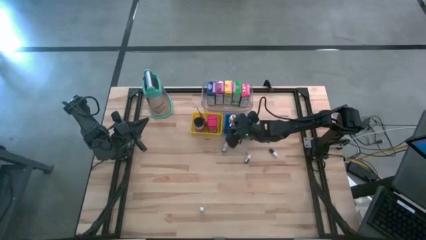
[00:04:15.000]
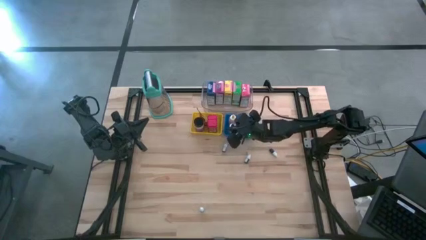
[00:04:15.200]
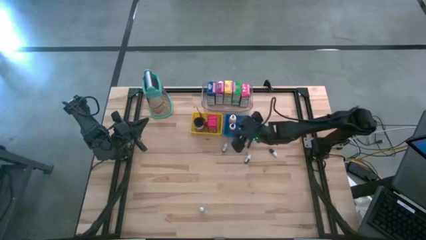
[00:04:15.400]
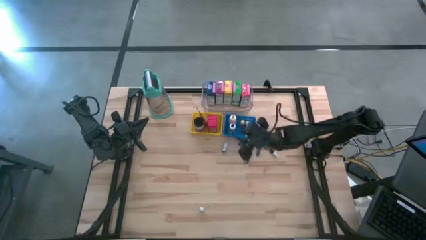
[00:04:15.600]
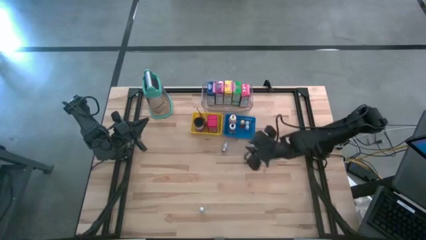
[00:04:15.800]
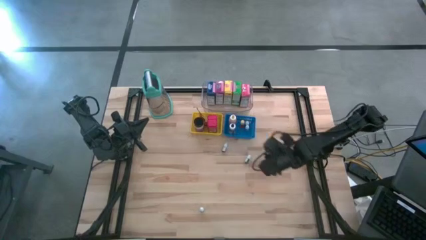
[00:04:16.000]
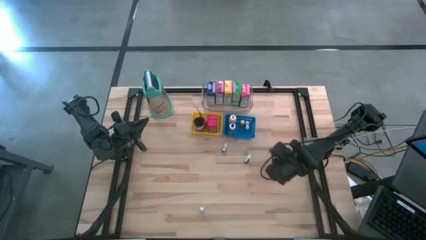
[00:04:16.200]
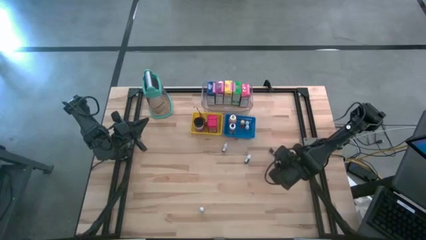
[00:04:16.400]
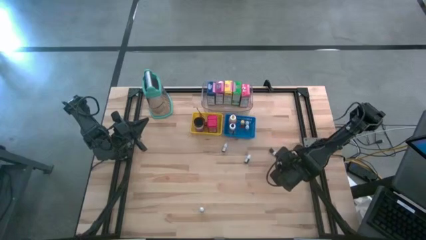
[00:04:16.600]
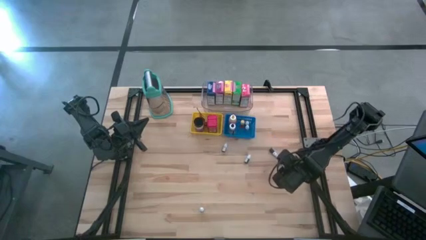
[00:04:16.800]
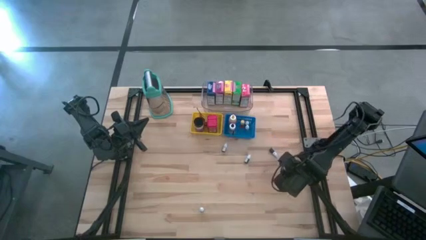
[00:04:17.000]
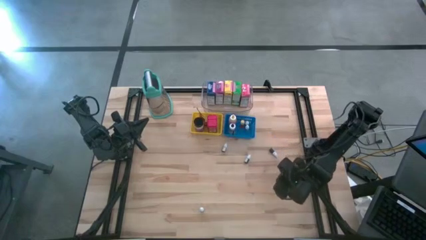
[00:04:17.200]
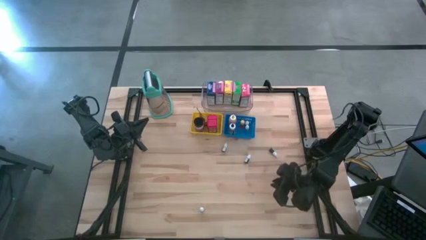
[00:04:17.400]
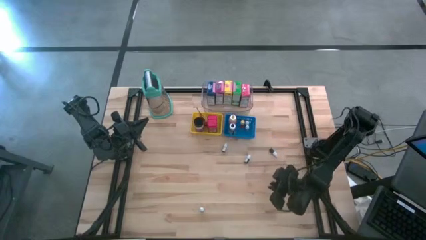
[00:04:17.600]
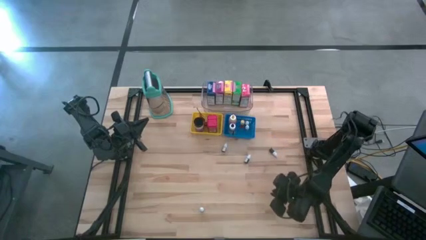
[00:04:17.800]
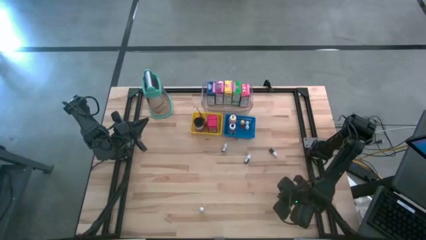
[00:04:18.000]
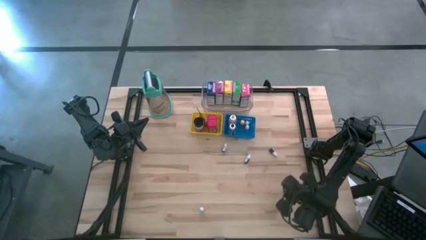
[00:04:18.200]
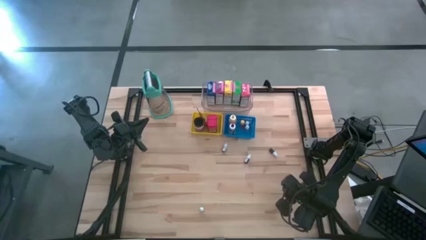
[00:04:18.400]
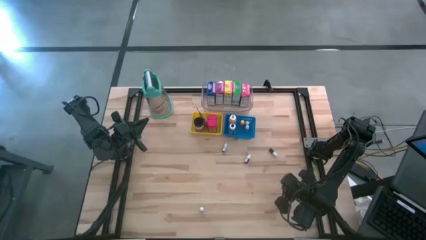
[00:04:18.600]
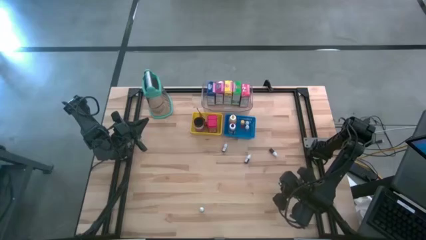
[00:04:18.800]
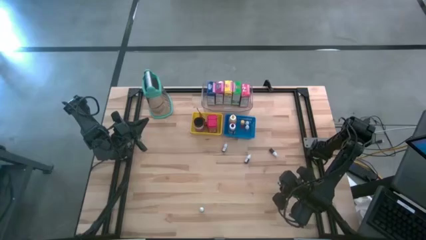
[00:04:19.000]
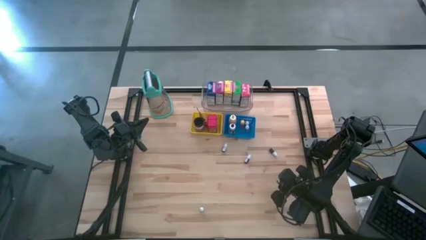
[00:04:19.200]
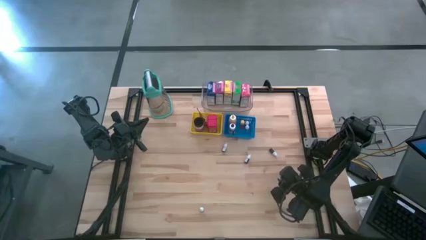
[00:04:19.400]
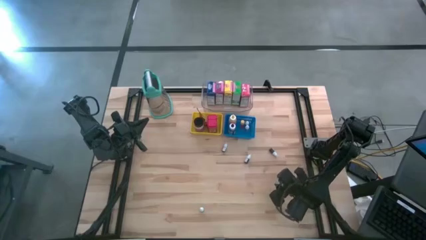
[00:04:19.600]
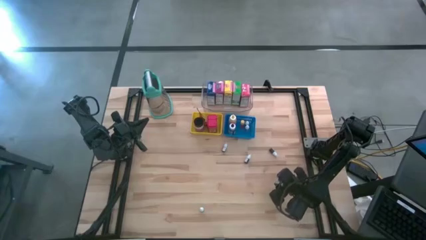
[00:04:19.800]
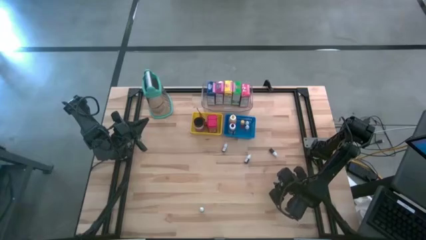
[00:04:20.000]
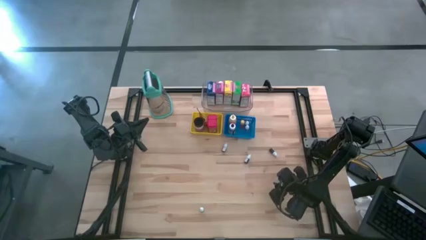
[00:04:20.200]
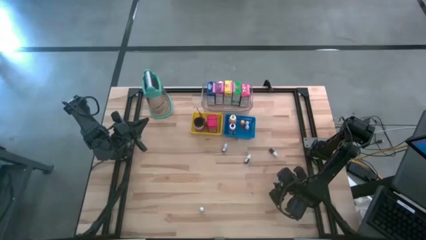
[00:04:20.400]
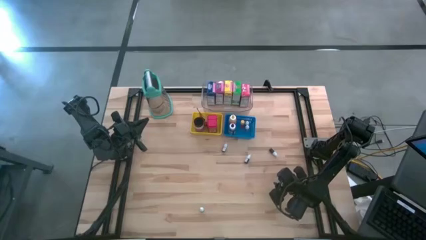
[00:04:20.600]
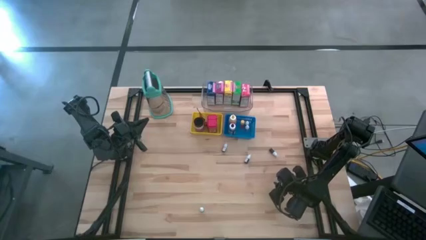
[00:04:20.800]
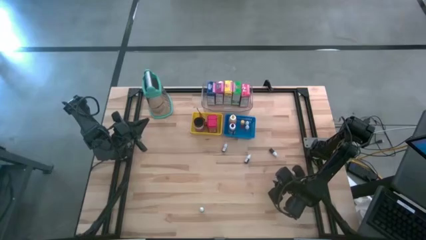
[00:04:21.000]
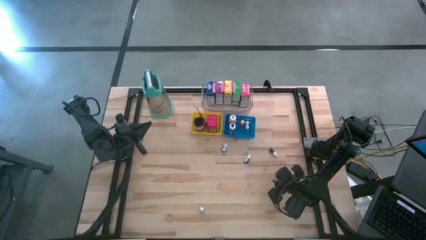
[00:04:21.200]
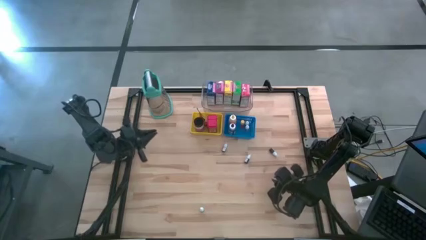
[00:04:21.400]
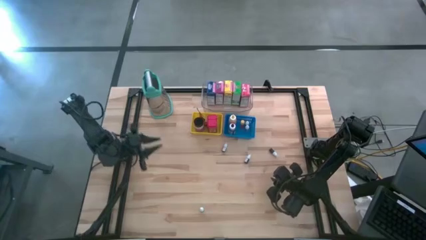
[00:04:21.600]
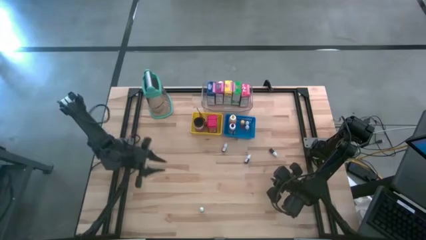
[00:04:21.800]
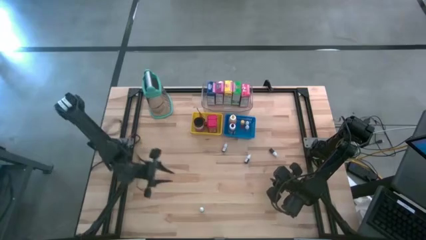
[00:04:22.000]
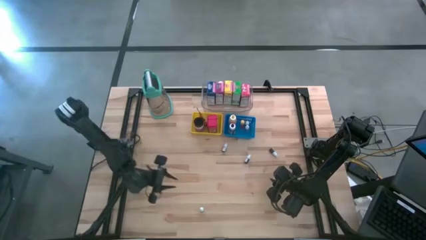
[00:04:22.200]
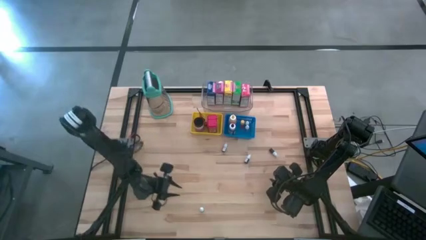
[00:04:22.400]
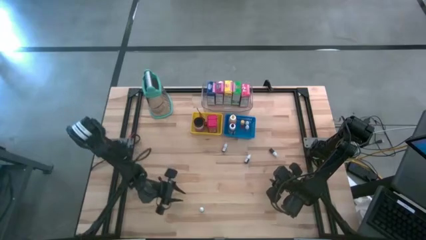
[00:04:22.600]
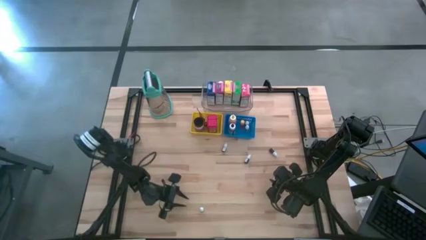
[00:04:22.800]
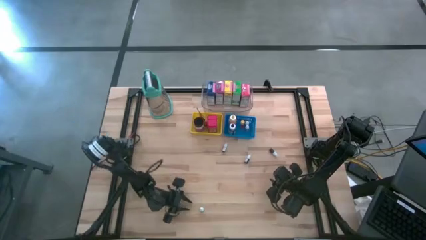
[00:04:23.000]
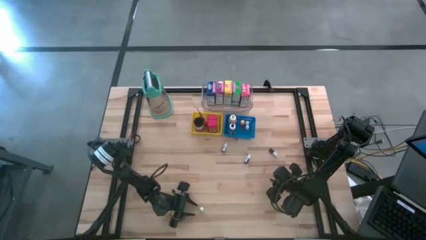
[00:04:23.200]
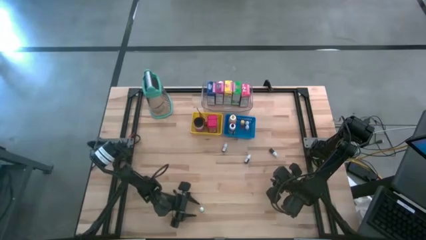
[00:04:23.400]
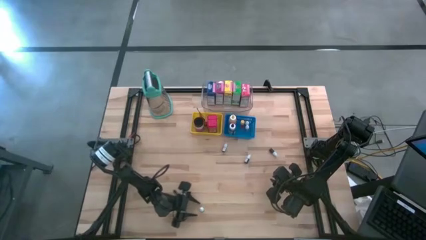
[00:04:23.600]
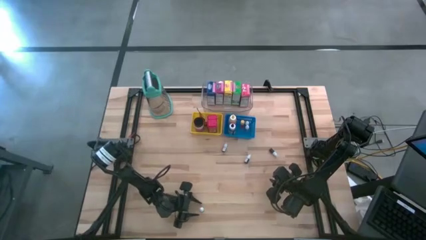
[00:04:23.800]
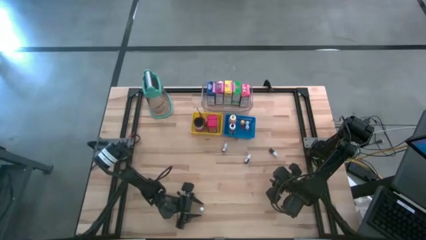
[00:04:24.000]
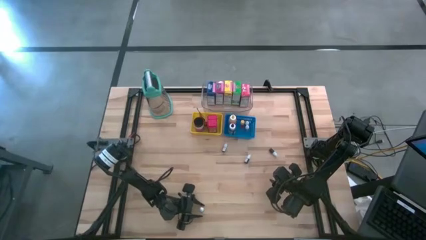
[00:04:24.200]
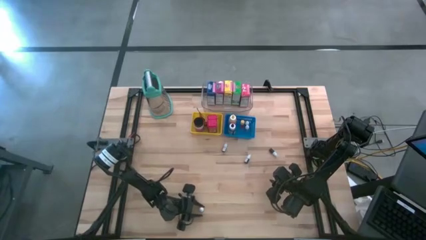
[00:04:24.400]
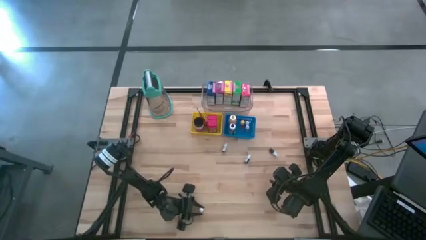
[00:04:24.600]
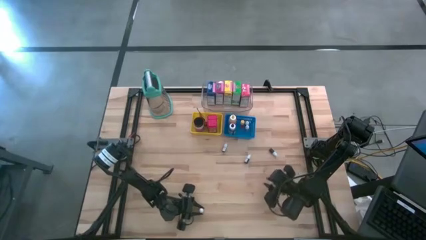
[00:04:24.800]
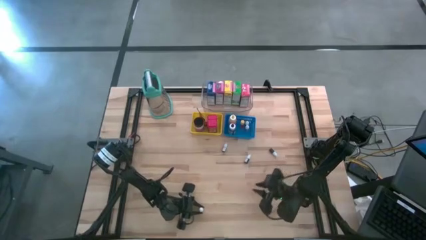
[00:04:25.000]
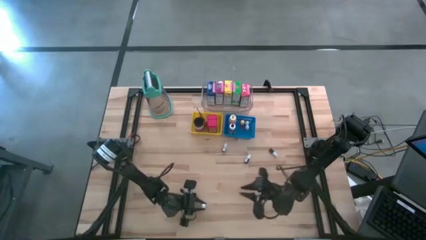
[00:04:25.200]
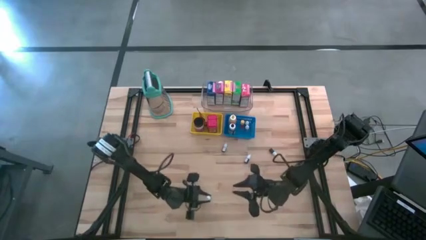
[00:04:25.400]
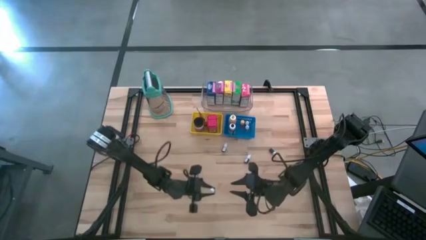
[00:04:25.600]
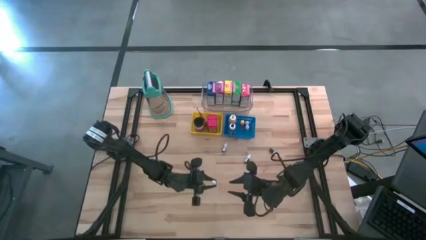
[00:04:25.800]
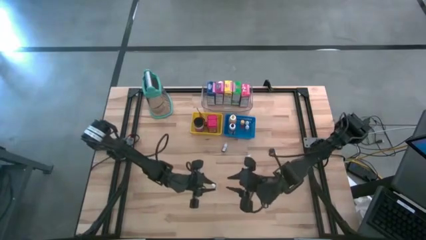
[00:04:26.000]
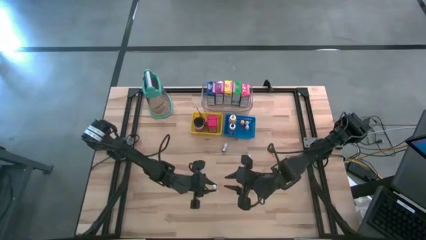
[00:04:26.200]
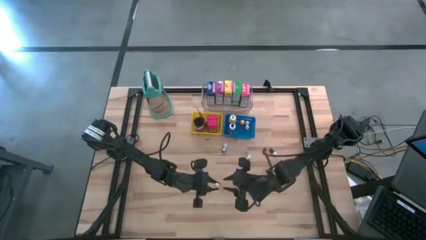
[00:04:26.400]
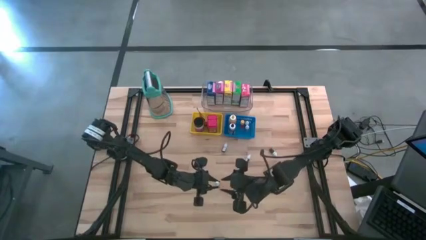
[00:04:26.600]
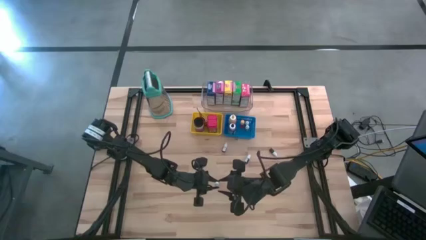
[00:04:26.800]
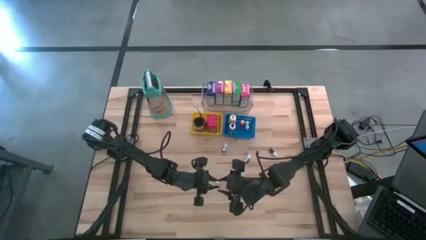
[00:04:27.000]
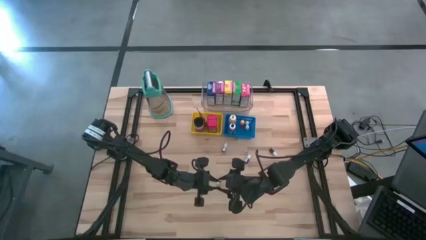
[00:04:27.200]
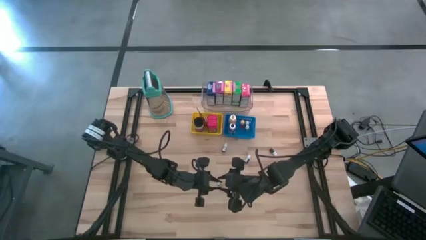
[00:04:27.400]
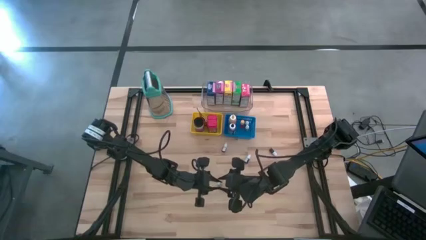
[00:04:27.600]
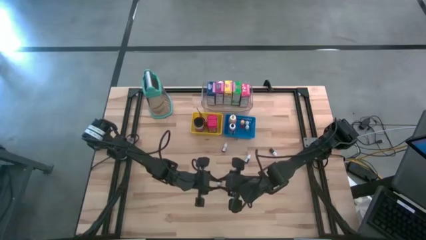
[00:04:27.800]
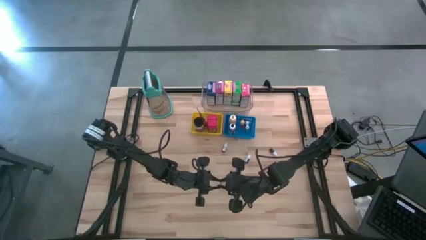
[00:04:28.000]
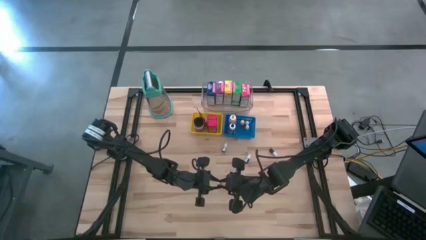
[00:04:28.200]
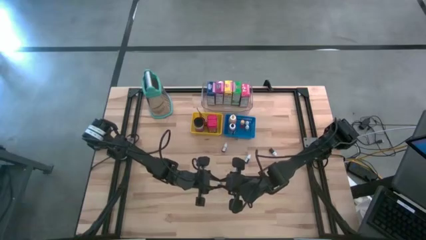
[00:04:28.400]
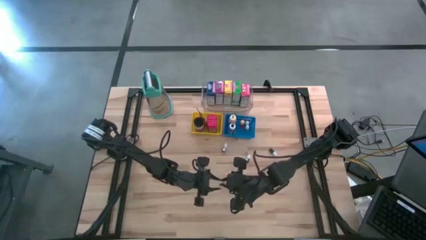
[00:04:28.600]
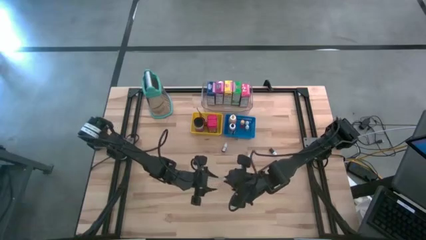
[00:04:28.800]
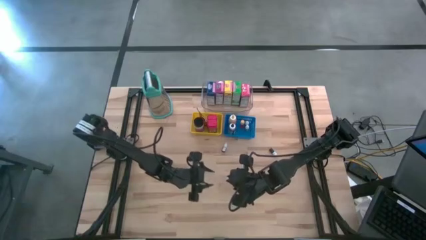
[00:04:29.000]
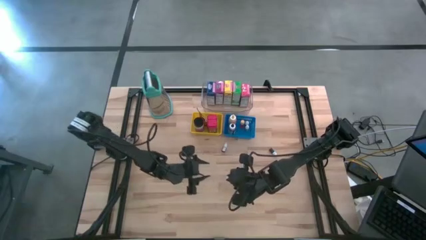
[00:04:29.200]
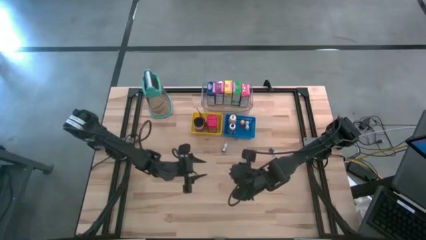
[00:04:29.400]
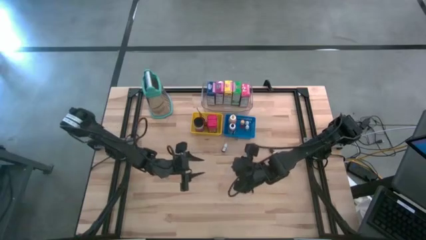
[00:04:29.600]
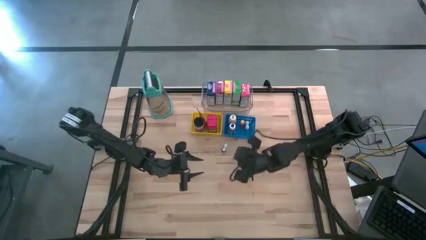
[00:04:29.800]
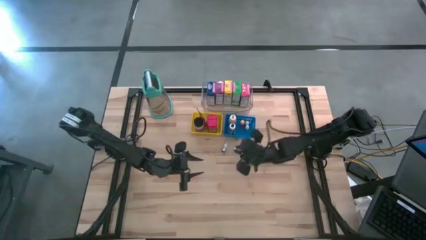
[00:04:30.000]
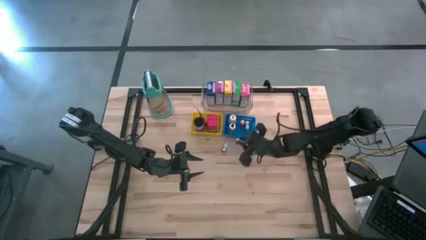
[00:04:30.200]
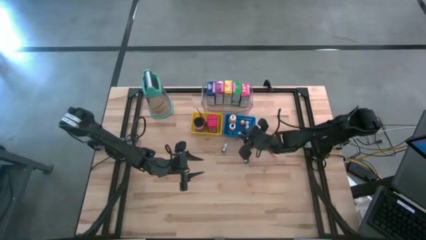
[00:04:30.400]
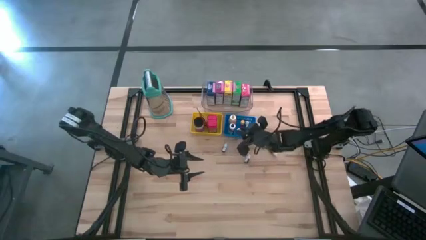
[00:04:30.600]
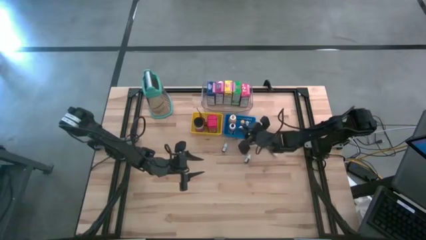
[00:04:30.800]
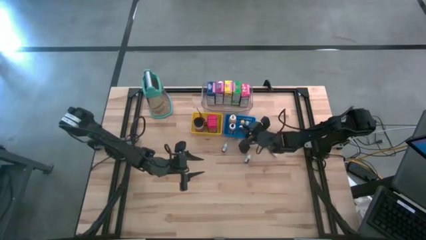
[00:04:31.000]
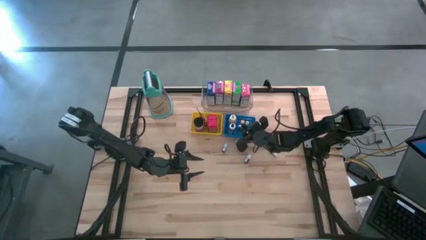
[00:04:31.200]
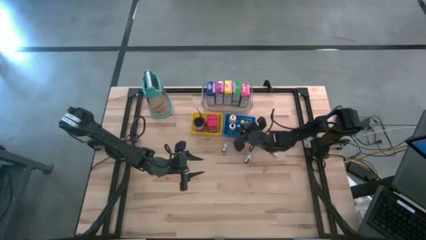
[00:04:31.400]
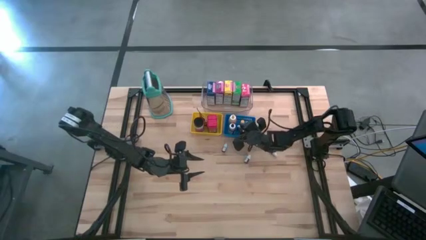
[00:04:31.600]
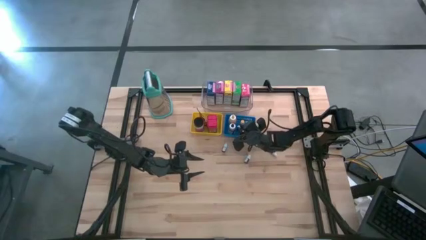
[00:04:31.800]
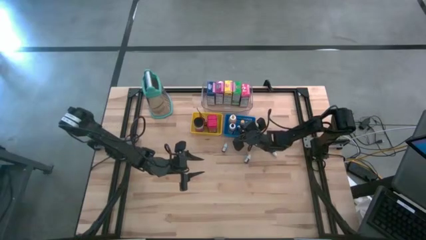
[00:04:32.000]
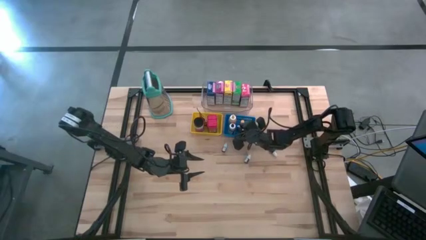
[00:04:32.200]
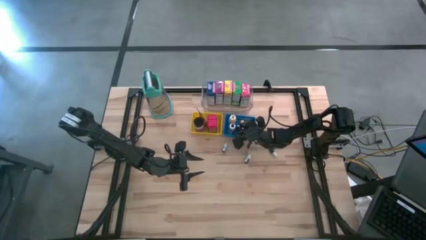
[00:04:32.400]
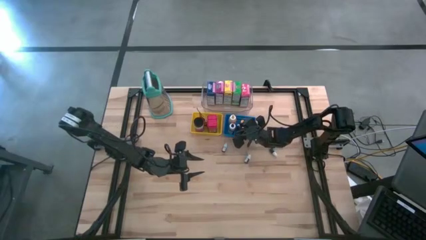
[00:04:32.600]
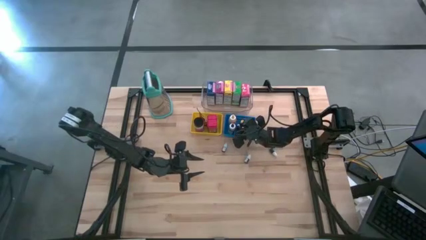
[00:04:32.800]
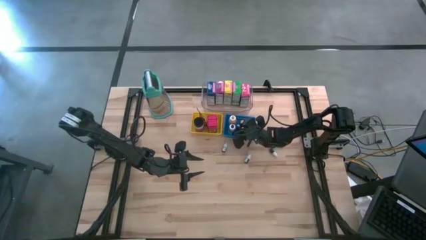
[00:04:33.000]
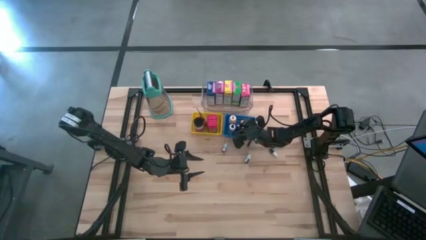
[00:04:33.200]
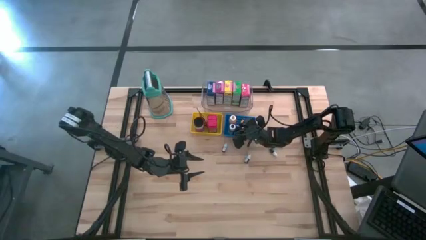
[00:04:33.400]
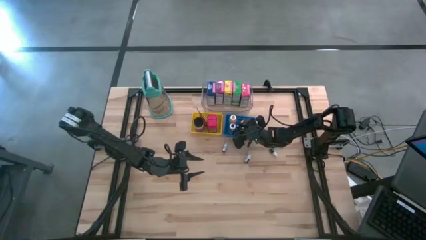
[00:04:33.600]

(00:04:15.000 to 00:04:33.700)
Task: Pick & Place Kitchen Items
Put the small black food coloring bottle into the blue bin
